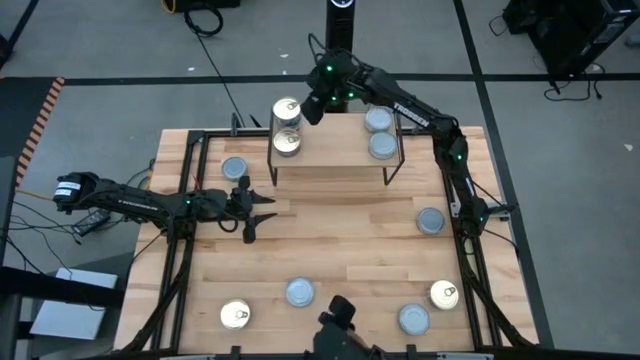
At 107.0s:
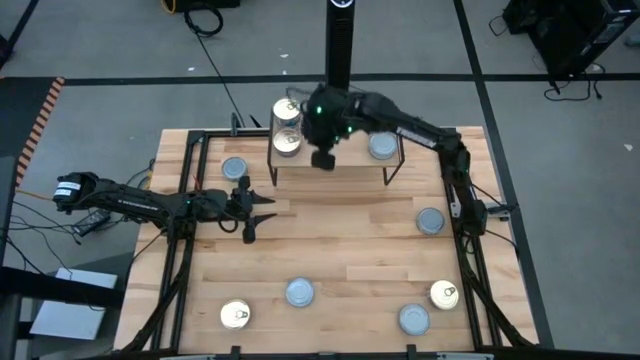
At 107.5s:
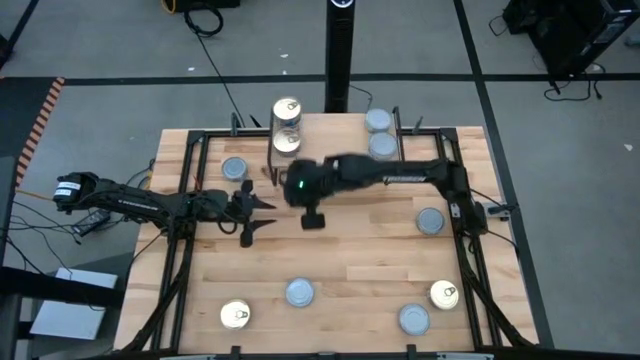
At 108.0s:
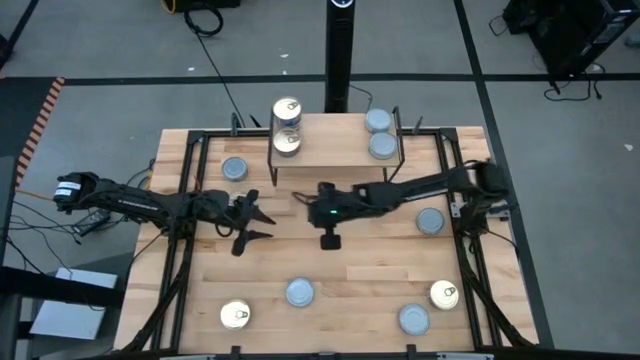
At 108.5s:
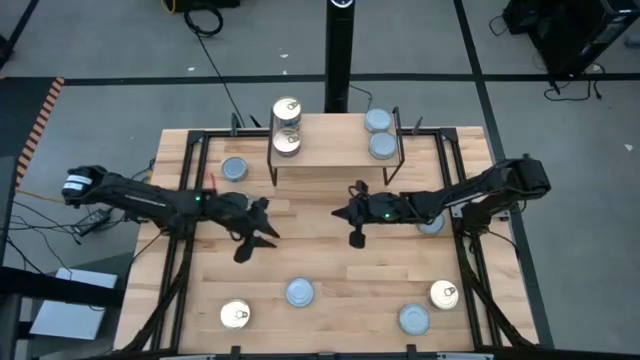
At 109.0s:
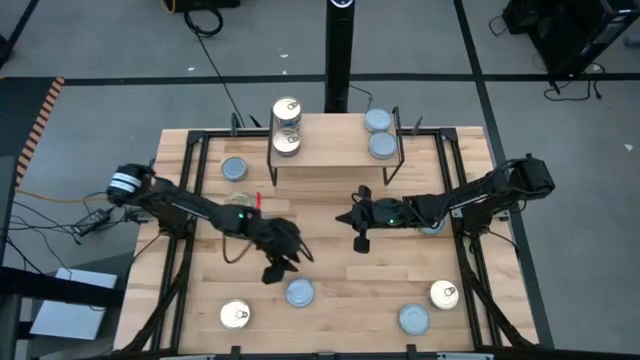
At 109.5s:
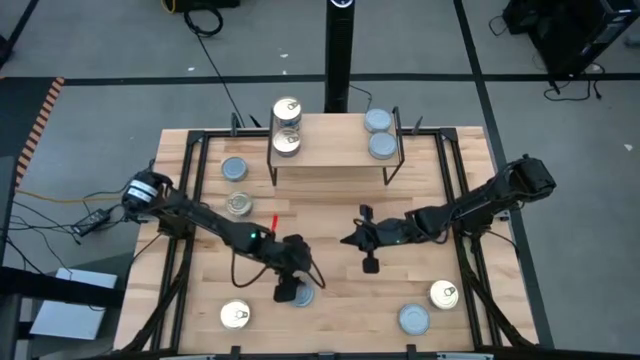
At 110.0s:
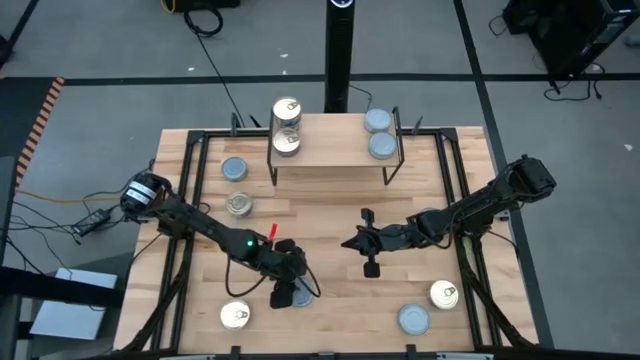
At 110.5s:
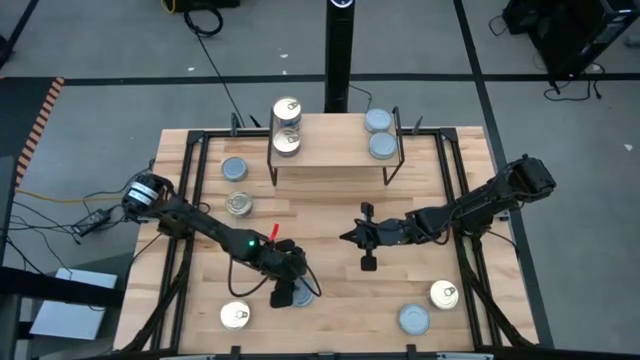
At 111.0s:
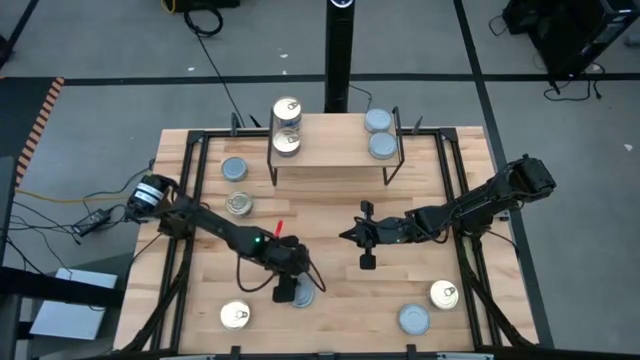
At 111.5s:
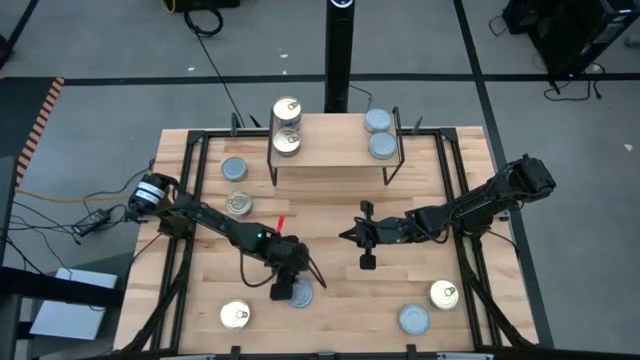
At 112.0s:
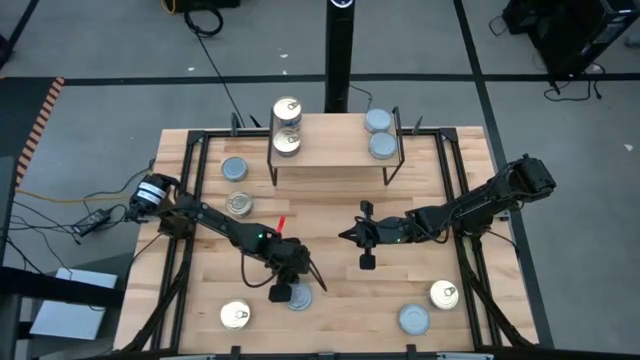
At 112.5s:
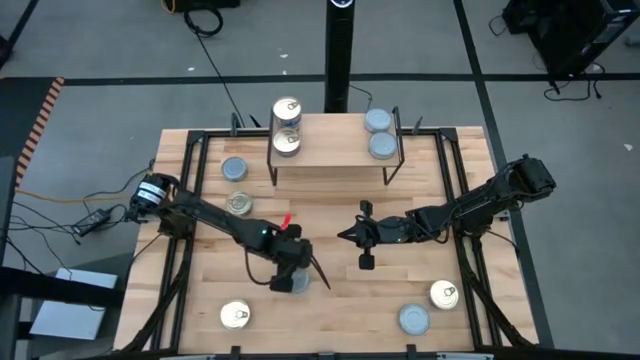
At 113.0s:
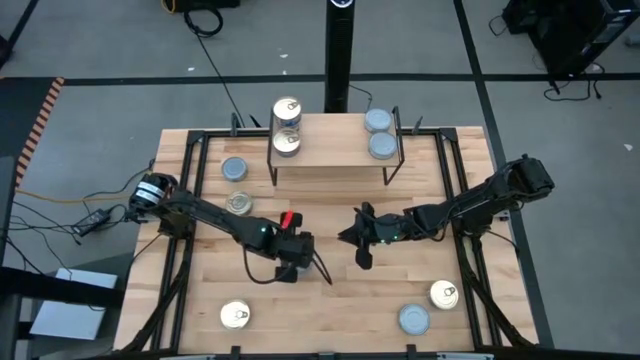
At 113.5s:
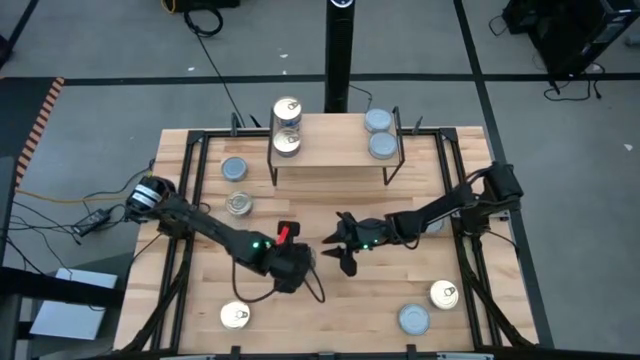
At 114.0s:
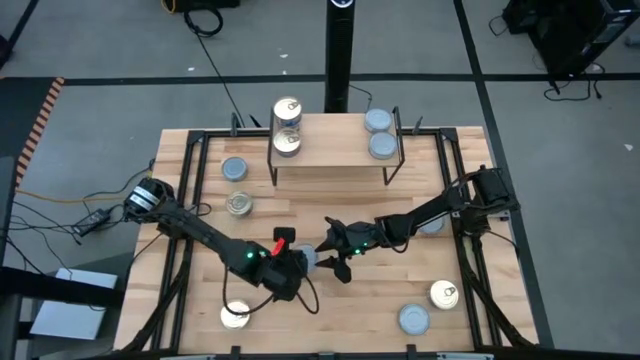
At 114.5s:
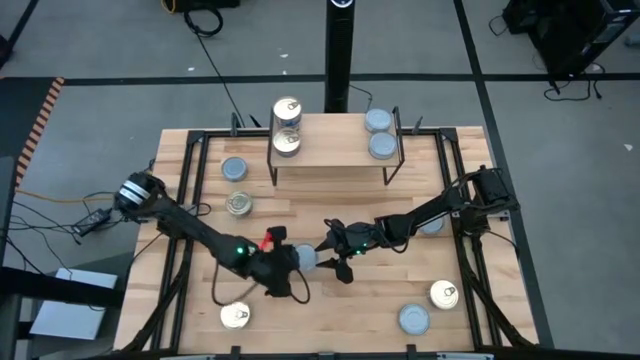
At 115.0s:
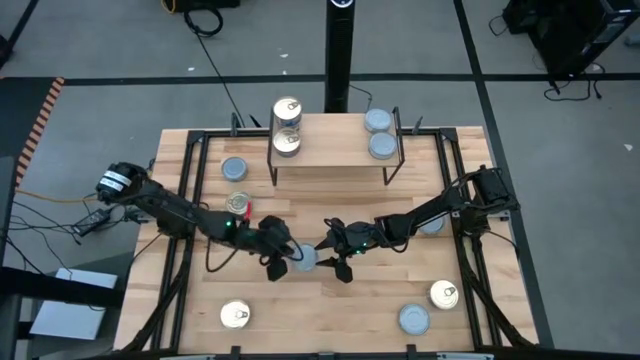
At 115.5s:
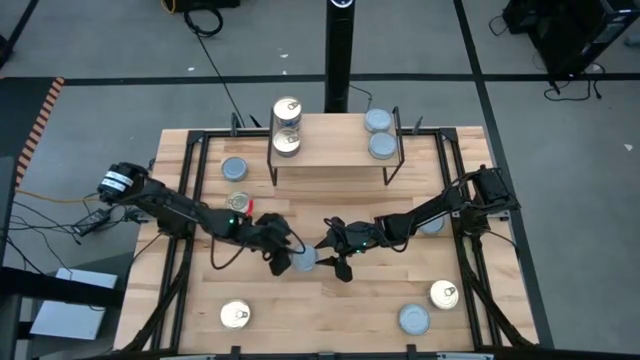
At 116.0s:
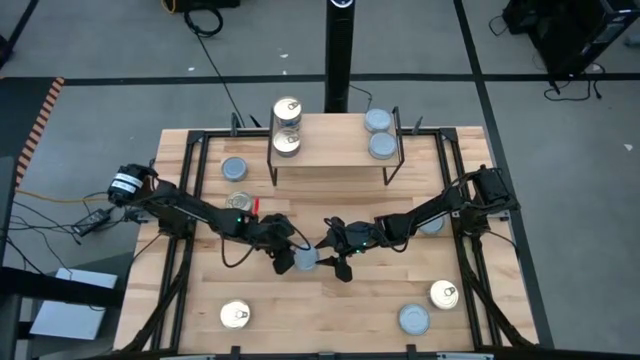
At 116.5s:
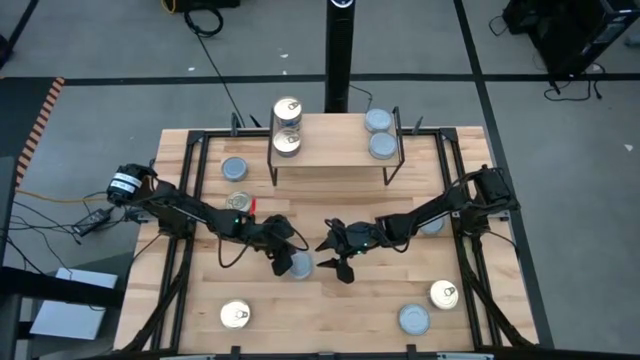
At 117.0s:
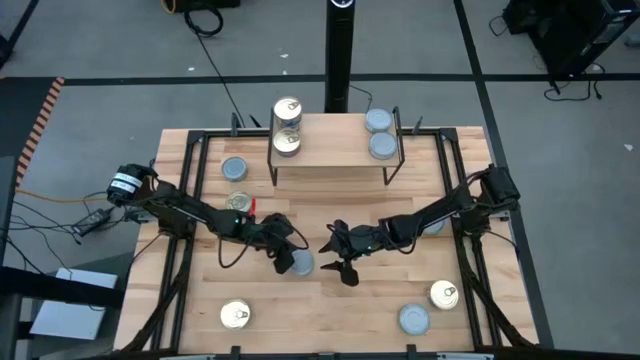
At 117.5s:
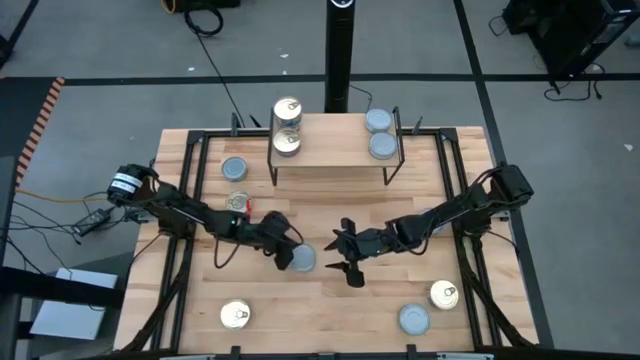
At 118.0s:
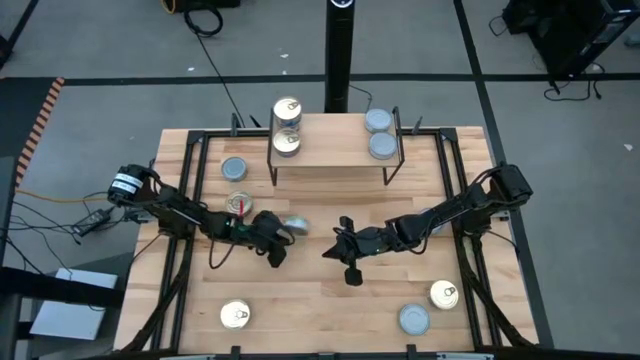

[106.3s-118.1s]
Task: Stack canned seafood by type on shelf
Stack the green tuna can on the top green tuna can on the shelf

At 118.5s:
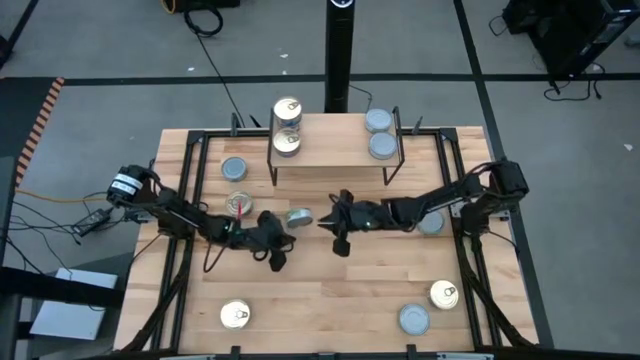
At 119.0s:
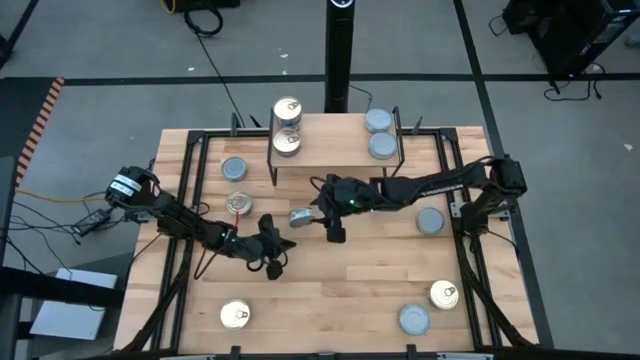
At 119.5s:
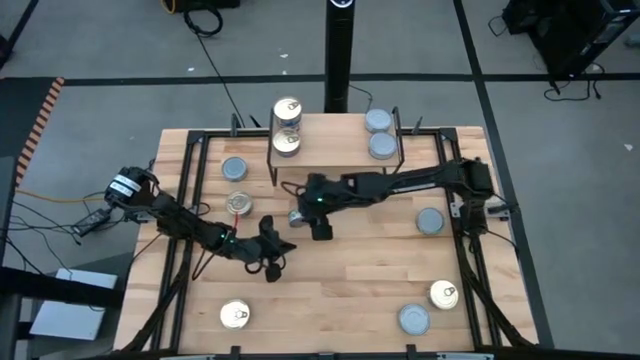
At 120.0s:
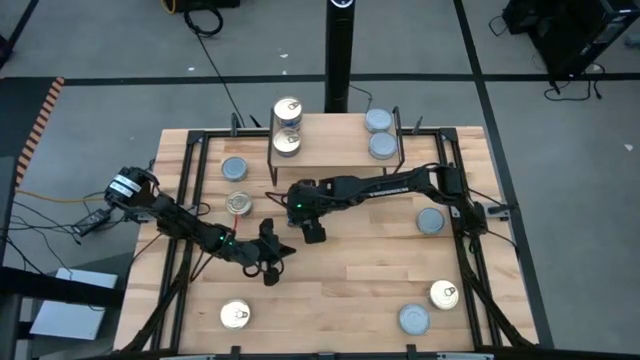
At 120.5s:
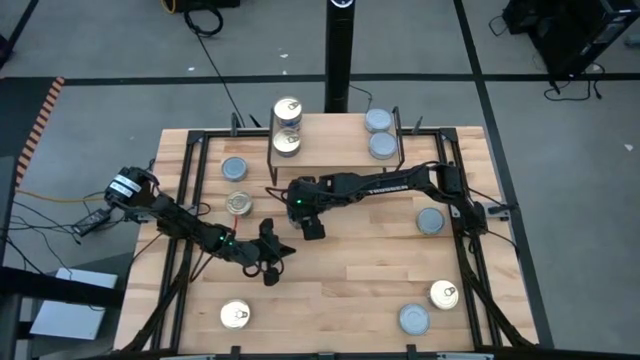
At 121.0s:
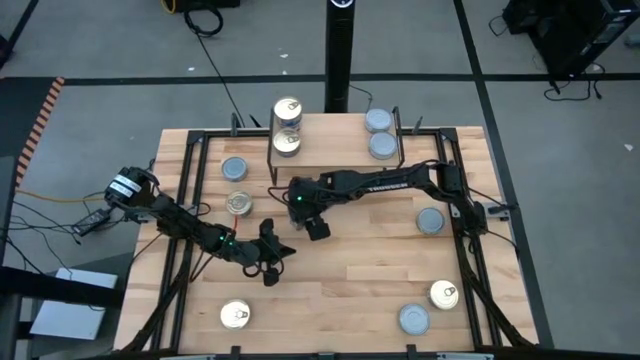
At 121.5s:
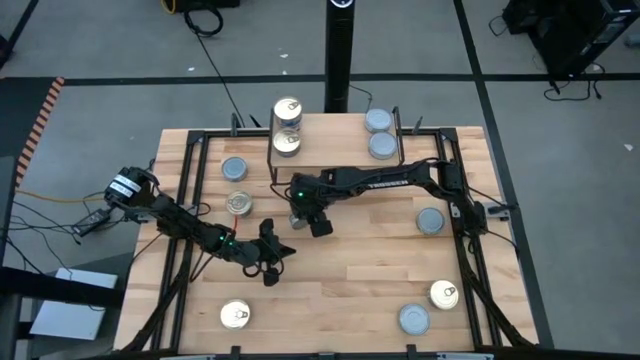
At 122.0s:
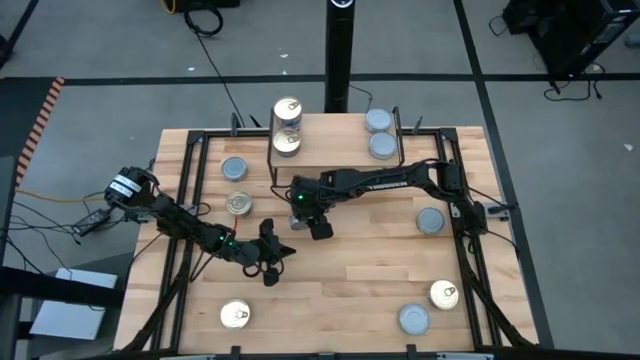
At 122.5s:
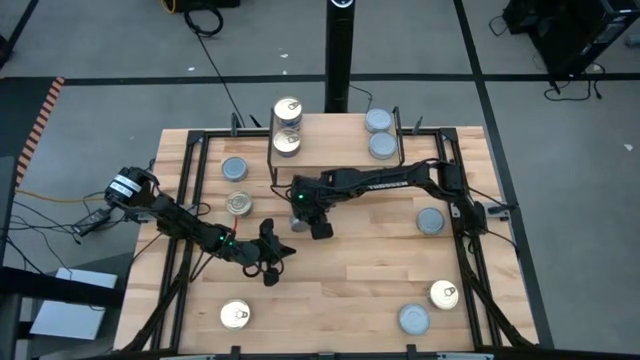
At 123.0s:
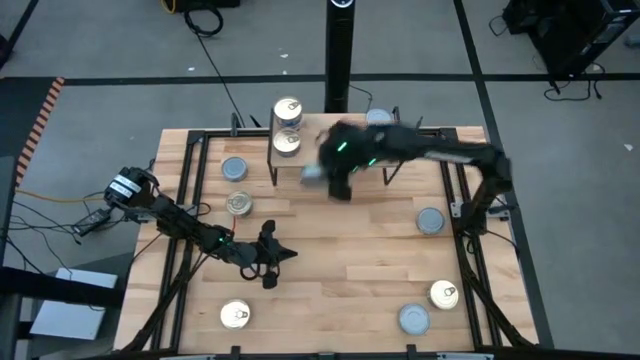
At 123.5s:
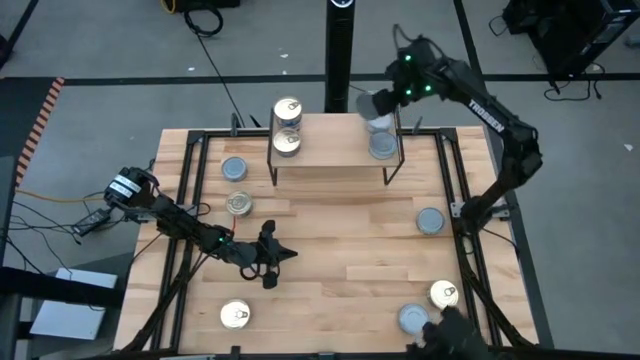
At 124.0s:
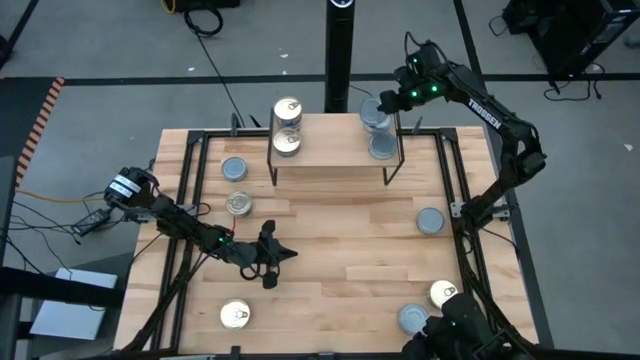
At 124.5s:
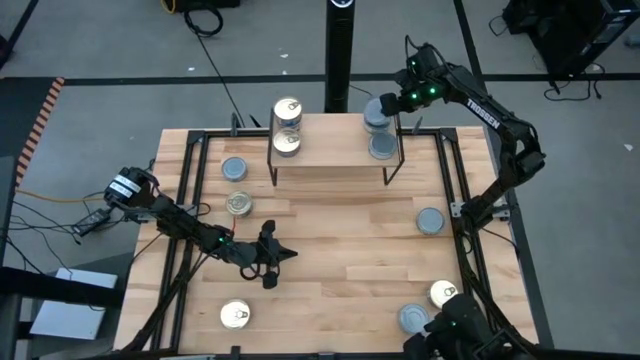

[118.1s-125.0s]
Stack the green tuna can on the top green tuna can on the shelf

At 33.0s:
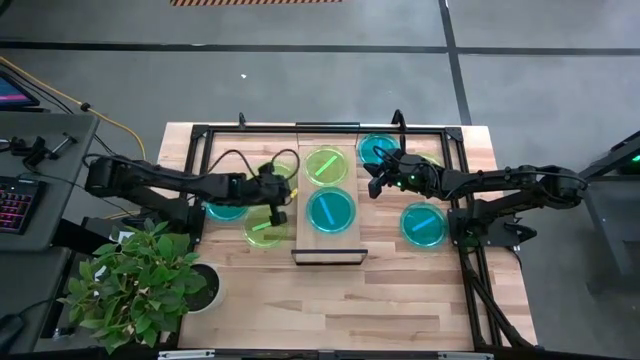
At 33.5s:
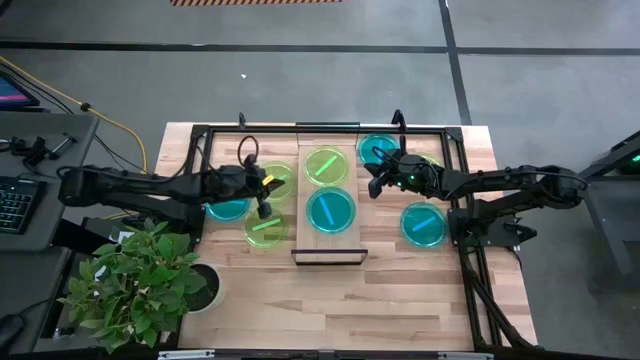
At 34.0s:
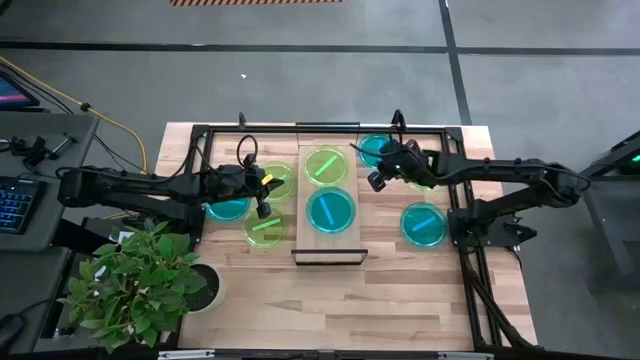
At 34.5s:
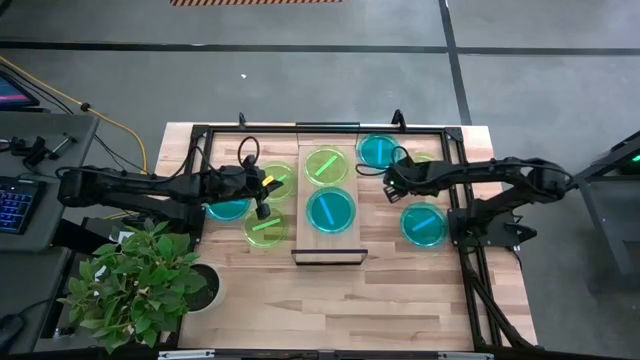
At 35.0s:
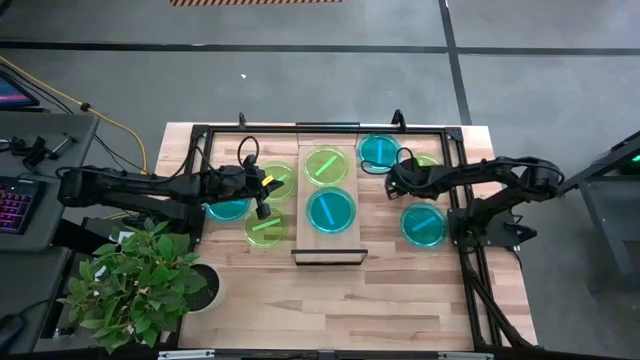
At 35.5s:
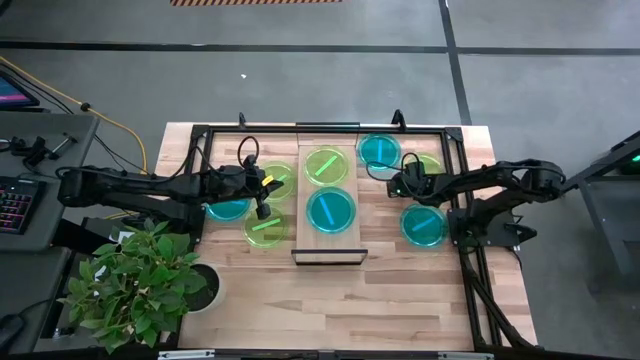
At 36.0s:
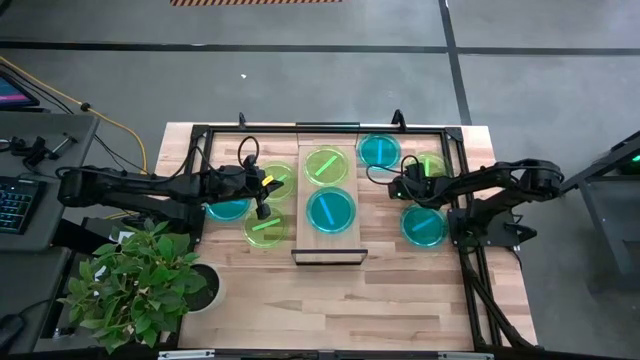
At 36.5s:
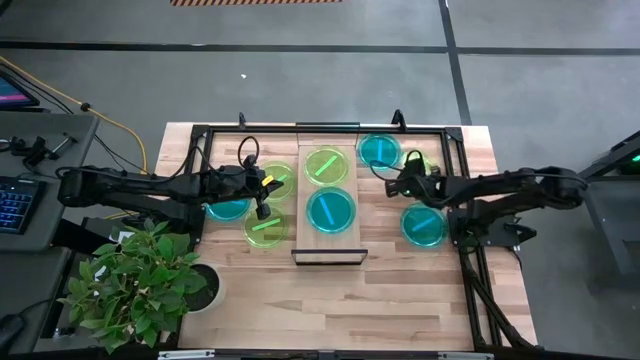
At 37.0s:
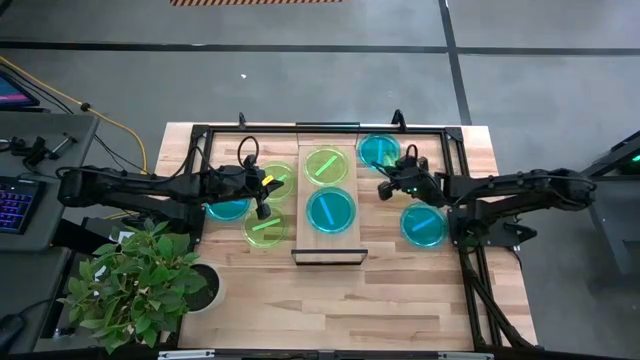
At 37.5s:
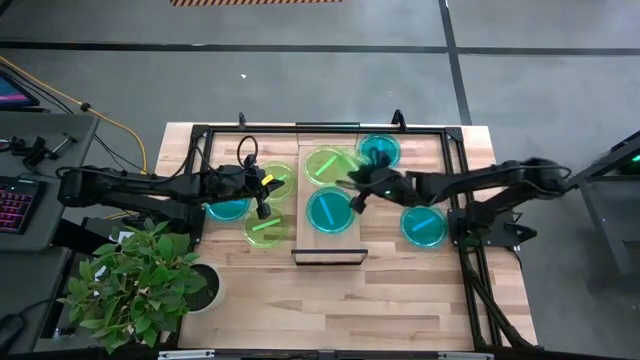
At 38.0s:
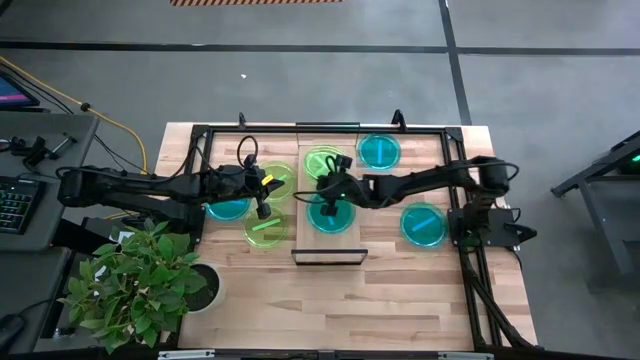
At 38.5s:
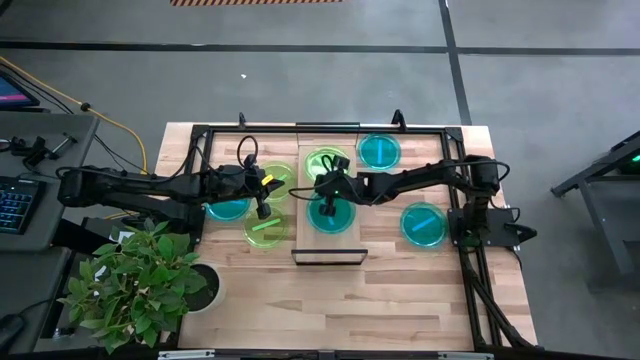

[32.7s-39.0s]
Task: Place and stack plates onto a shelf
Stack the top right green plate on top of the green plate on the shelf
